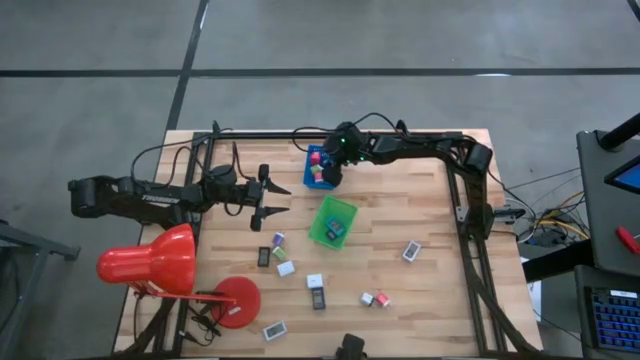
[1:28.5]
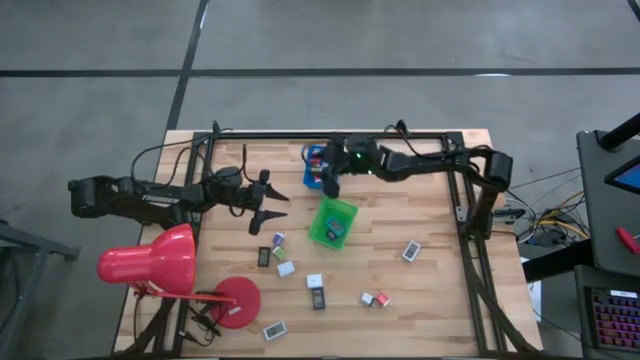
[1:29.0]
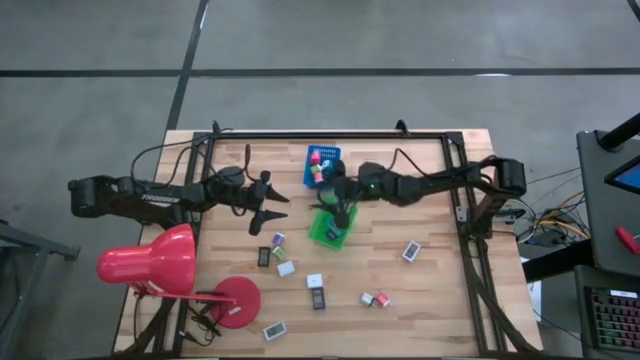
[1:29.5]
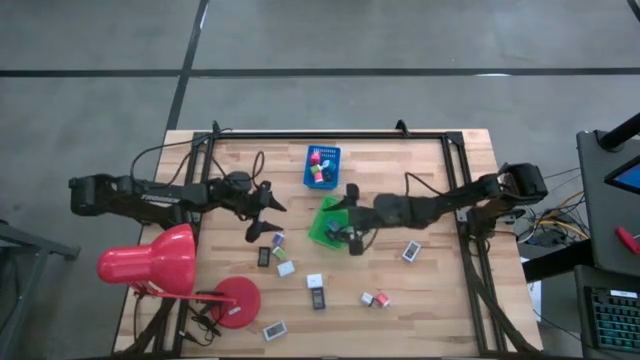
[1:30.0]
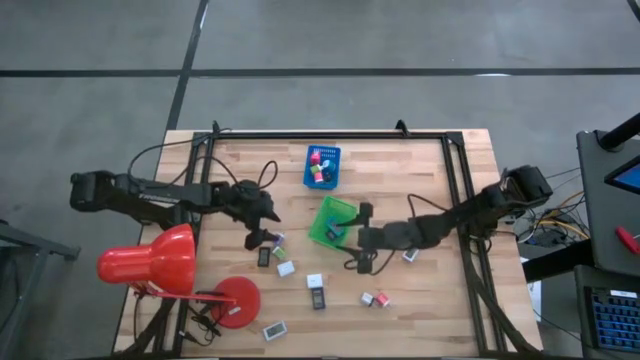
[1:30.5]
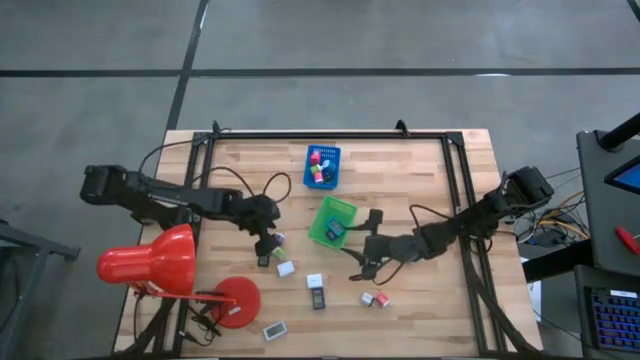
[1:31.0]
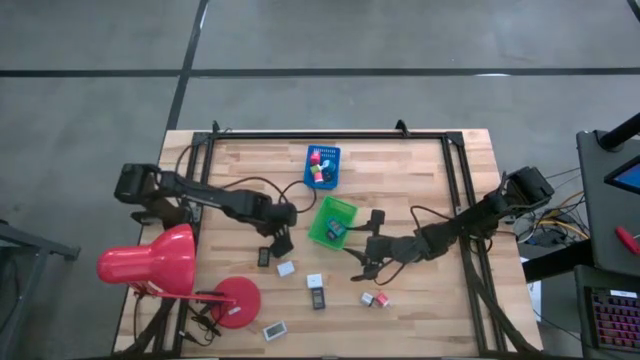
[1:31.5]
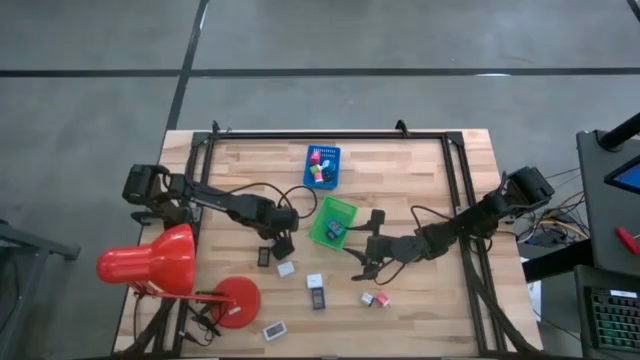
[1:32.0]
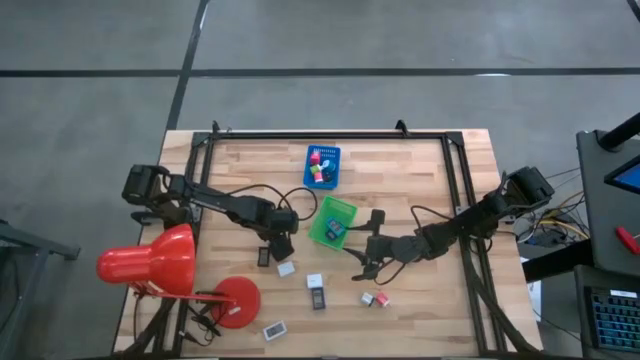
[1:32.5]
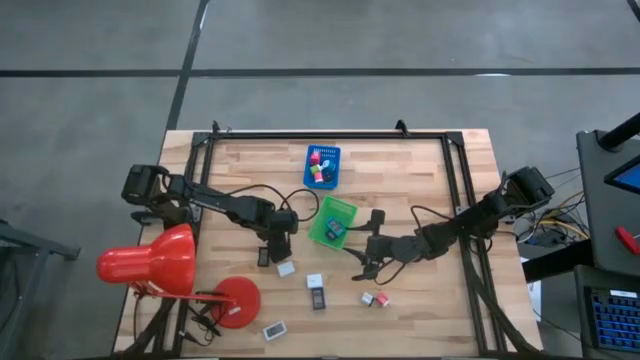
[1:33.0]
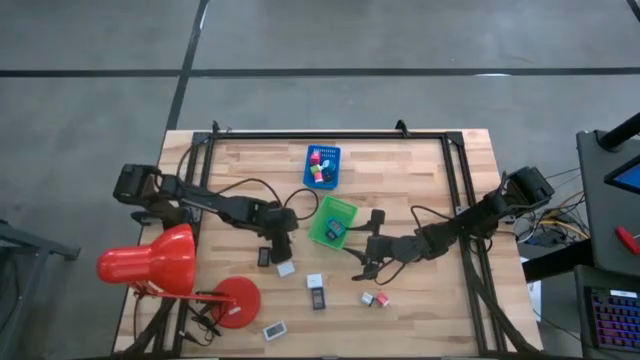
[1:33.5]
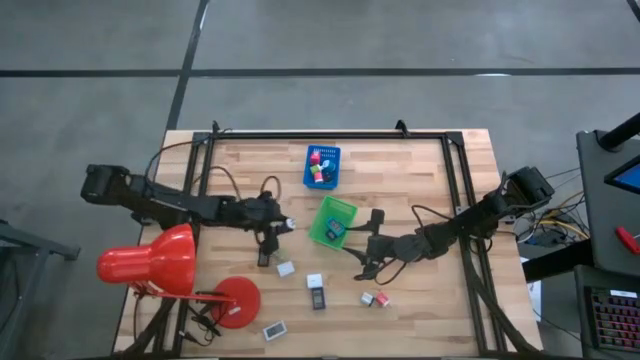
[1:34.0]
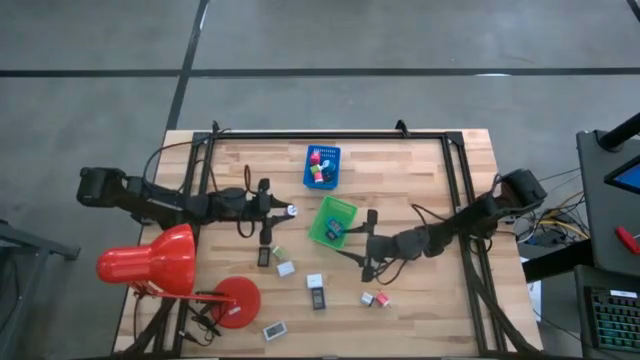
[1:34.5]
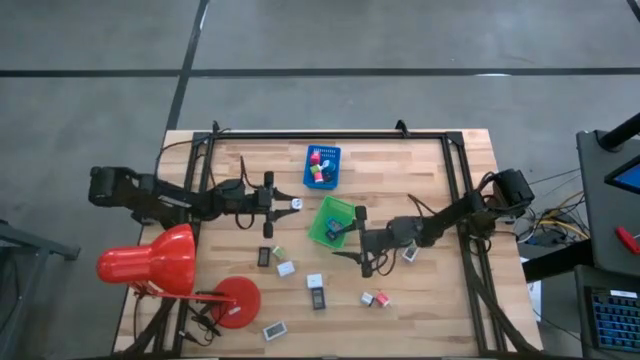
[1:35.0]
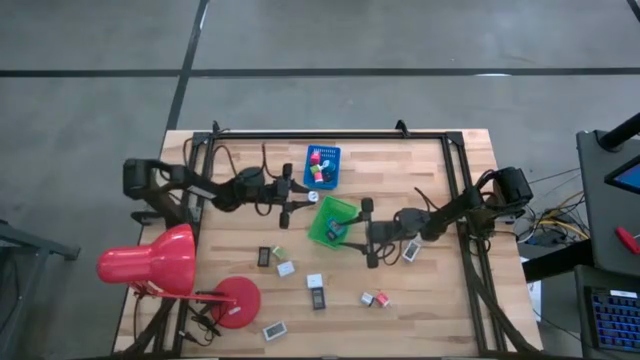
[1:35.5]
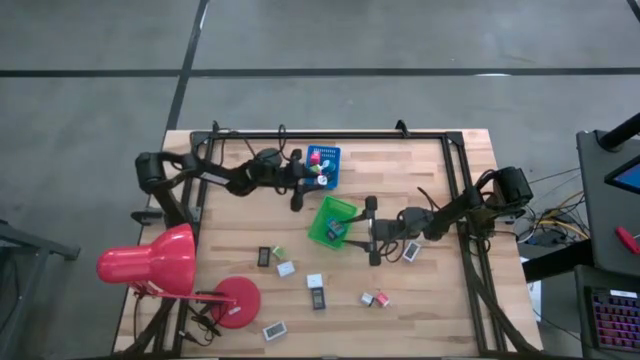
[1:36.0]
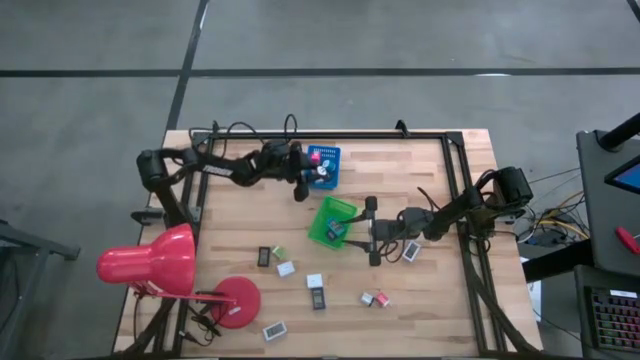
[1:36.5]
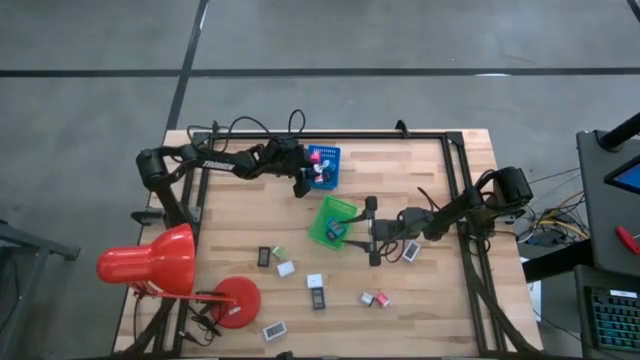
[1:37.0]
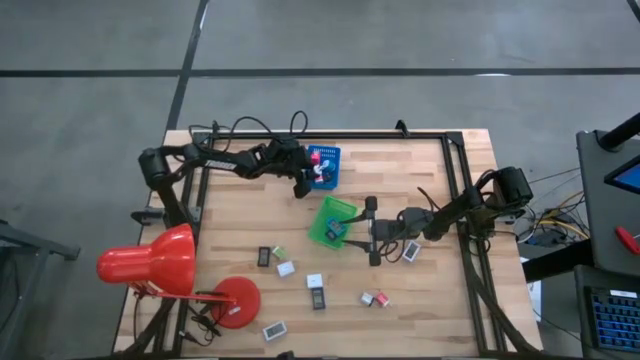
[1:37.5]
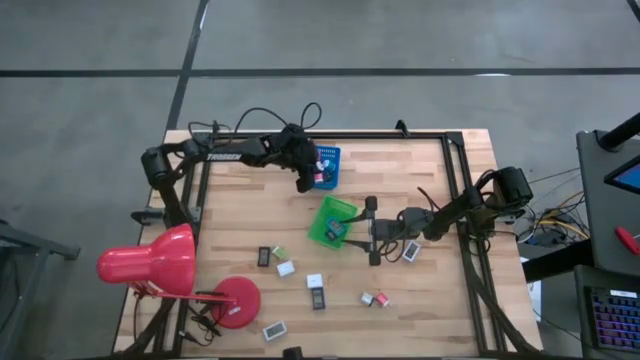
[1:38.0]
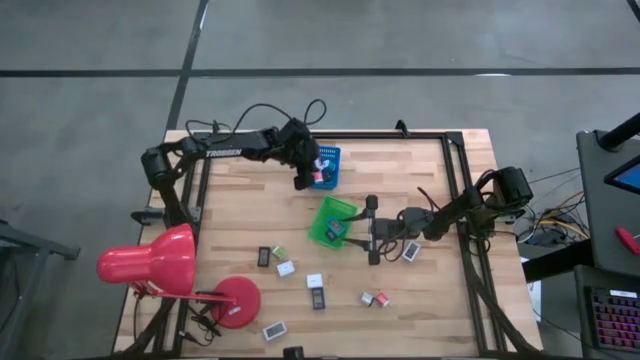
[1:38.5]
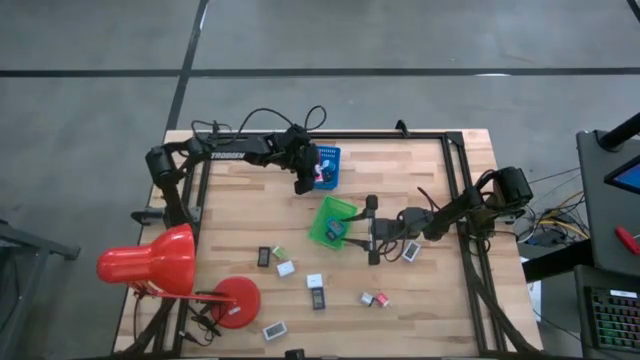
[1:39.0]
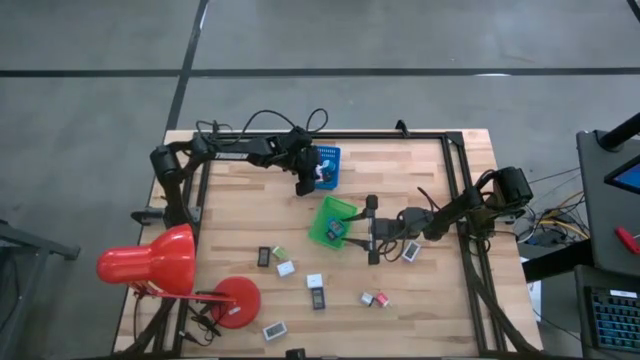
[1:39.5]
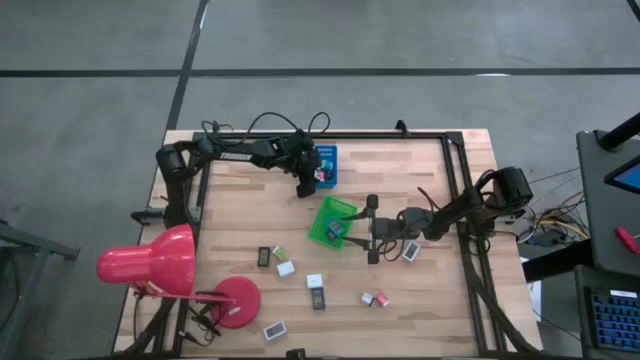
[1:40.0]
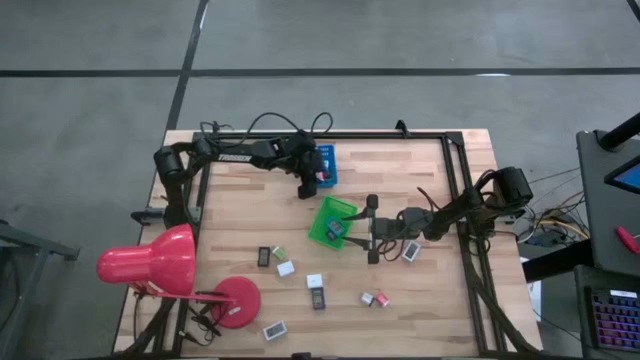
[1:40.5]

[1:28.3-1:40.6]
Task: Pick & Place Office items
Put the small purple charger adapter into the blue bin

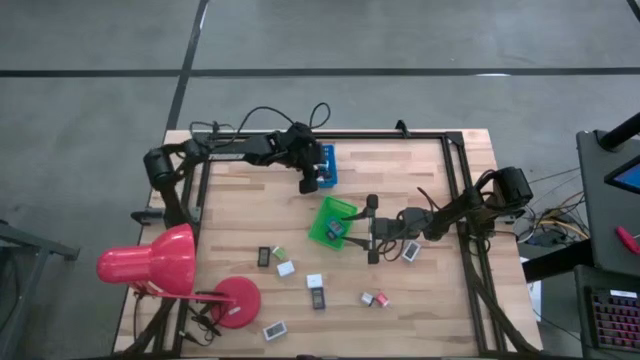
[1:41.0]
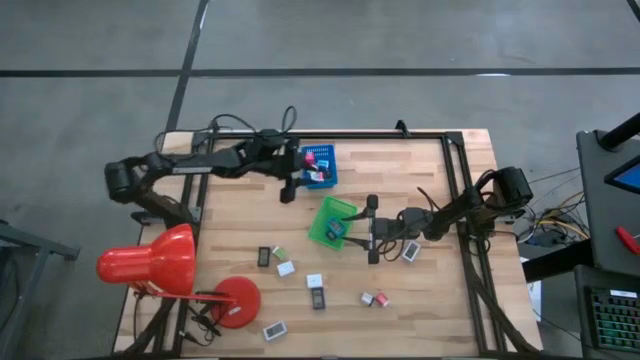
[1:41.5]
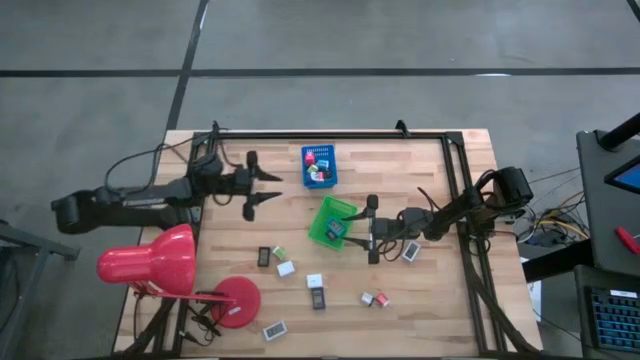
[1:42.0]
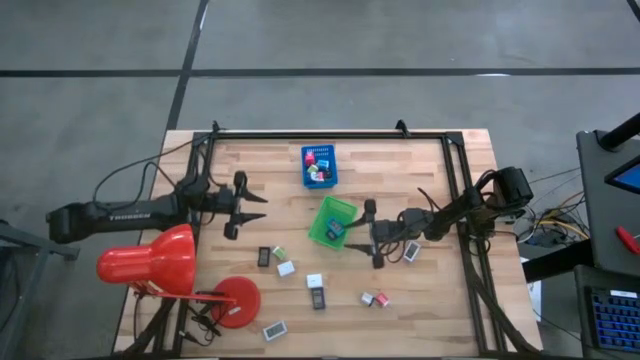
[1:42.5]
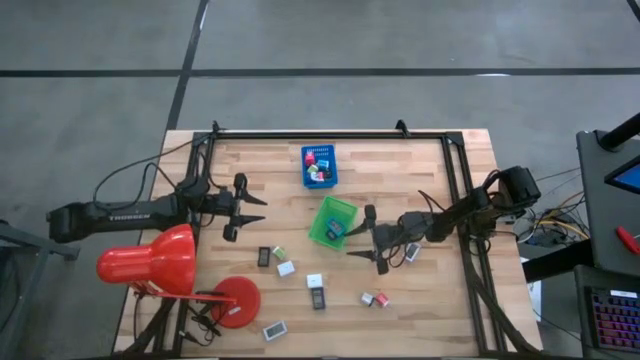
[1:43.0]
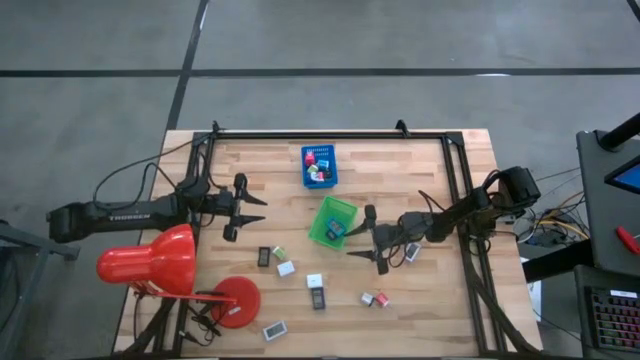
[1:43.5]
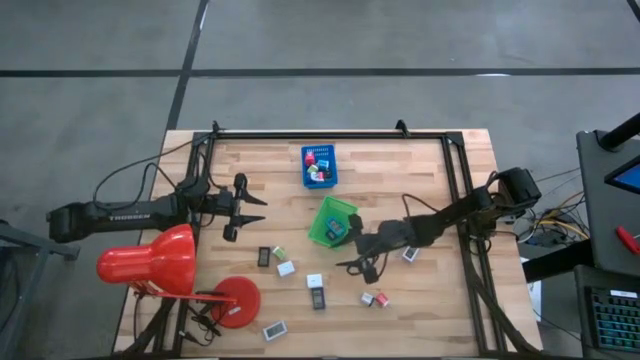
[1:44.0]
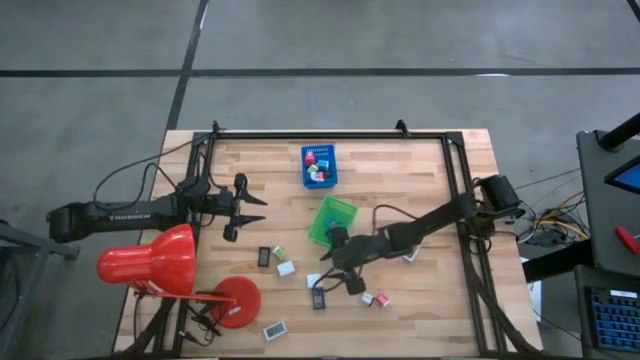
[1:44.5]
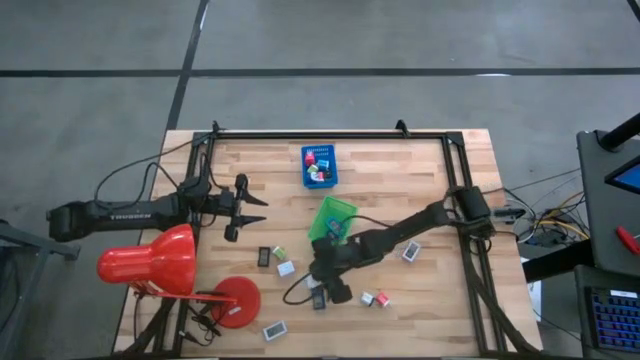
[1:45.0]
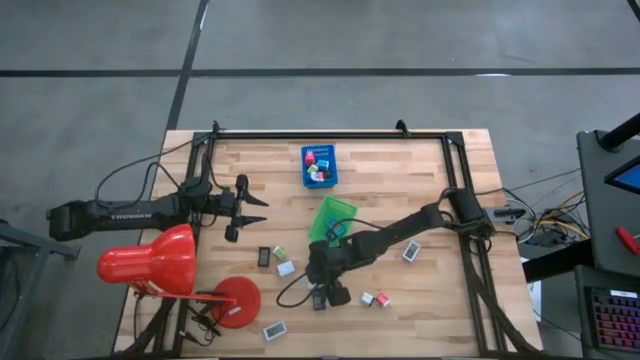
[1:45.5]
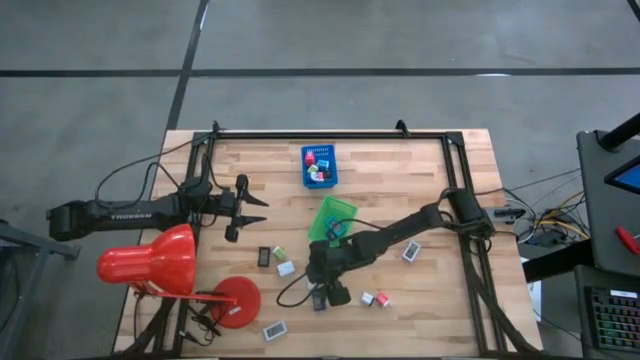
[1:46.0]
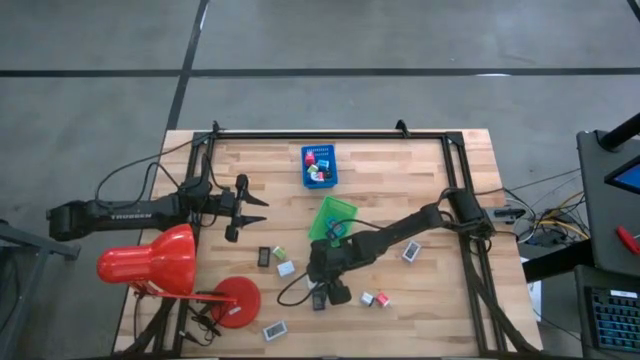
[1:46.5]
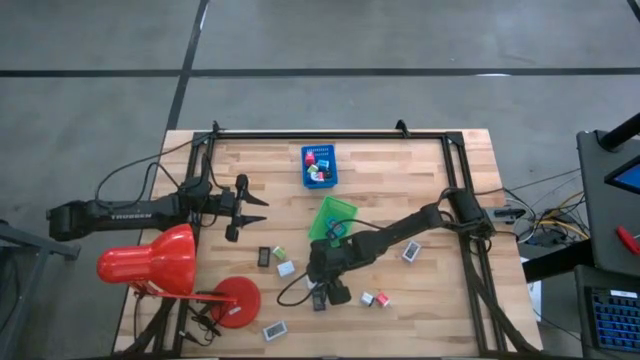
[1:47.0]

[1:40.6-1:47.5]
Put the right big white charger adapter into the blue bin

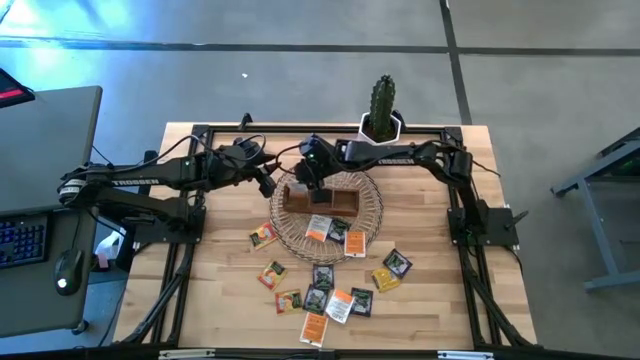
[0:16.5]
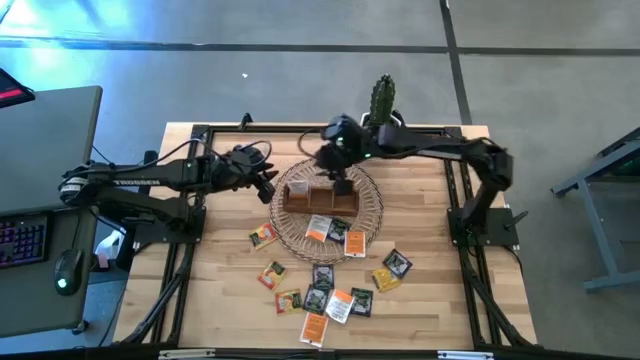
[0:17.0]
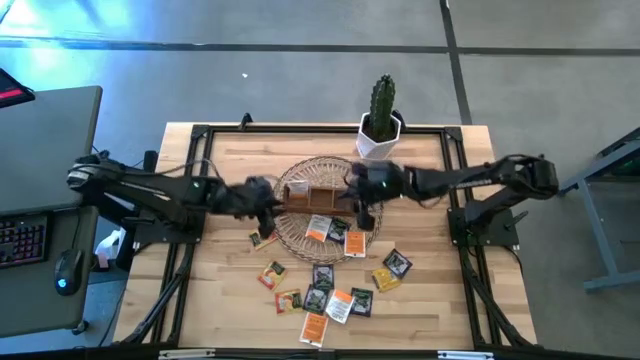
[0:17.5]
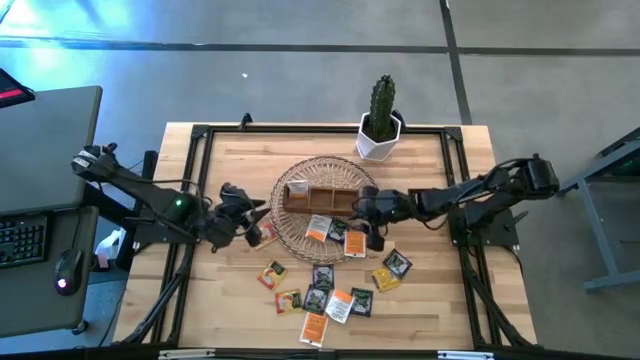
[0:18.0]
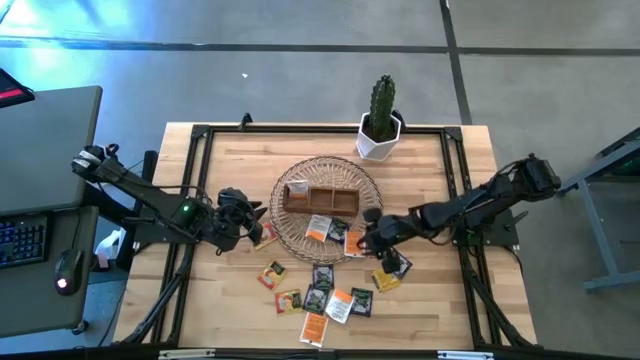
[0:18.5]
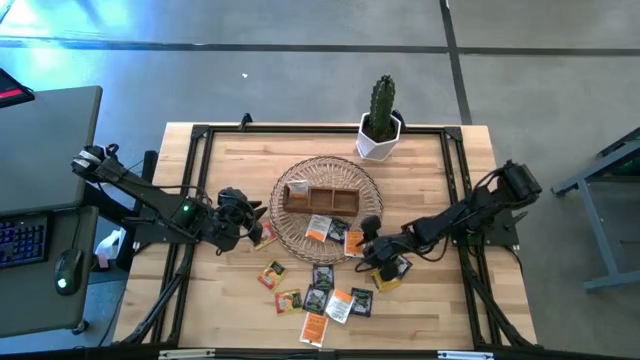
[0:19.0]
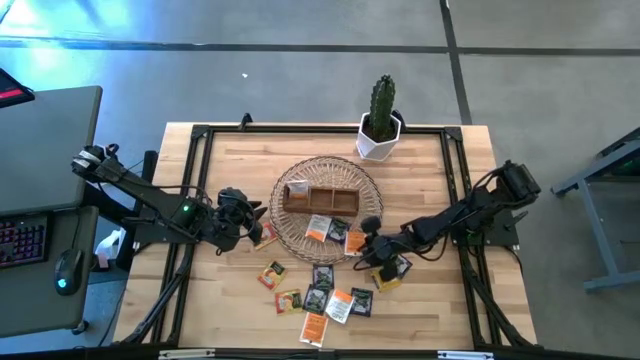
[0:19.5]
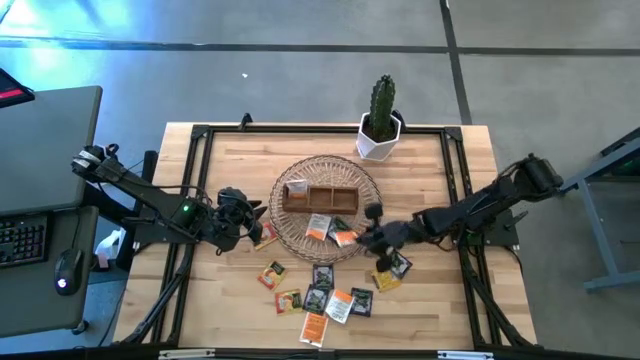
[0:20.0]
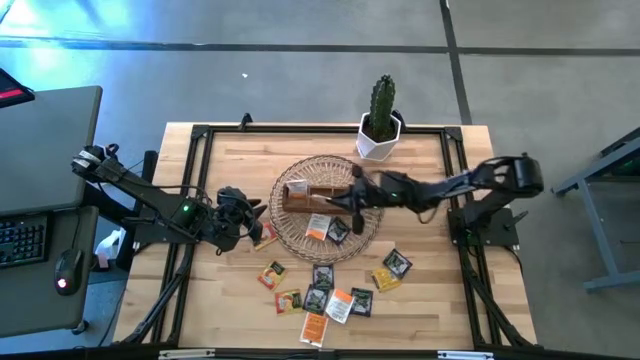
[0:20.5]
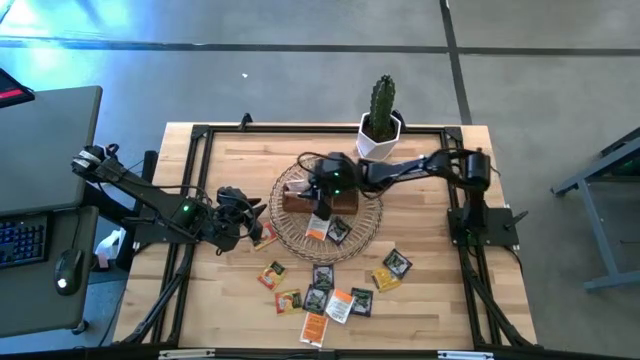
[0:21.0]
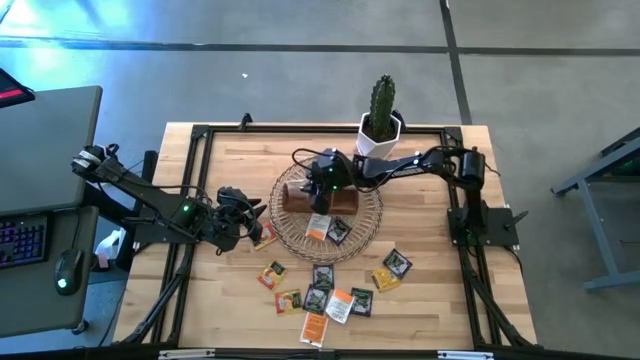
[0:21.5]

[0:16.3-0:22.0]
Task: Pick & Place Tea
Put the orange tea pack into the left section of the wooden organizer
